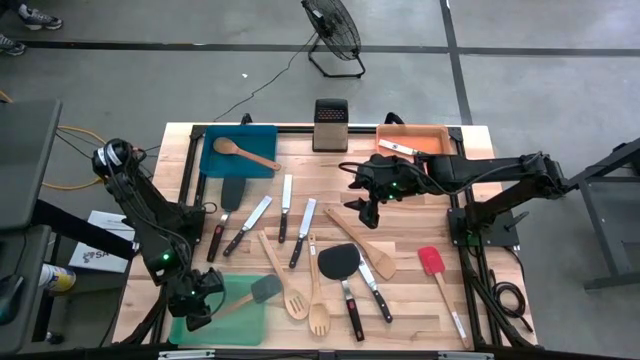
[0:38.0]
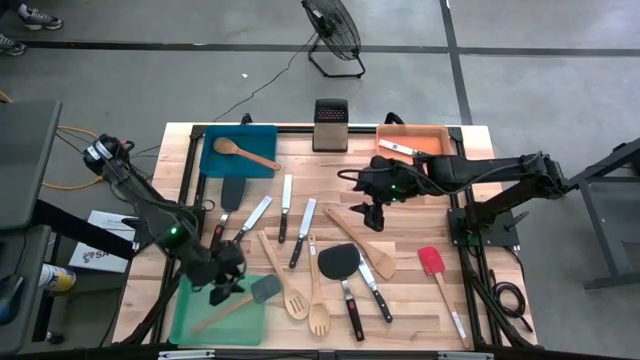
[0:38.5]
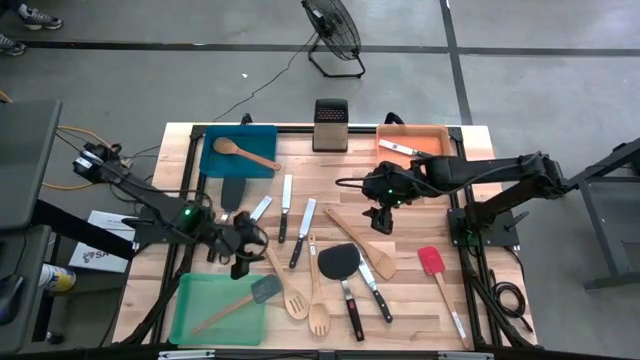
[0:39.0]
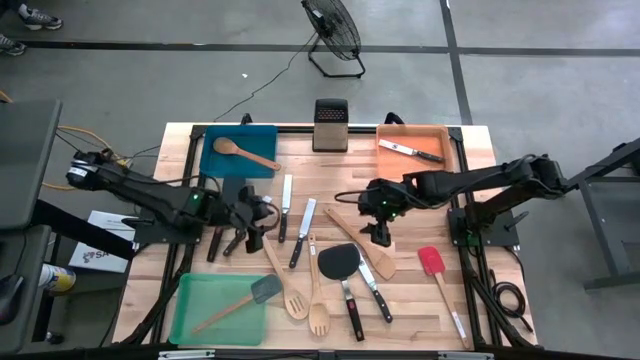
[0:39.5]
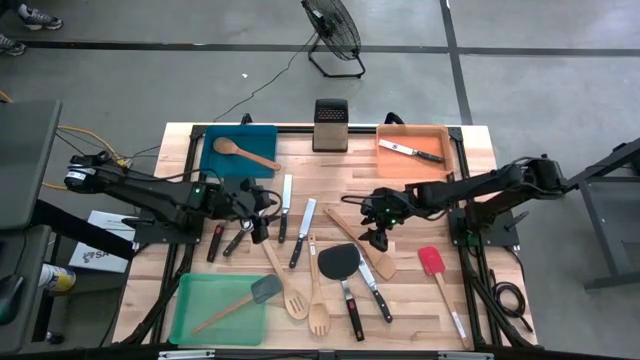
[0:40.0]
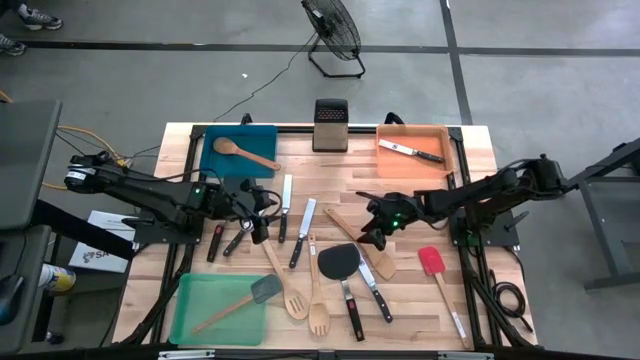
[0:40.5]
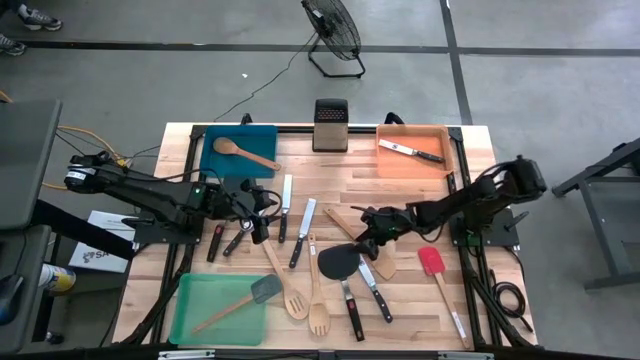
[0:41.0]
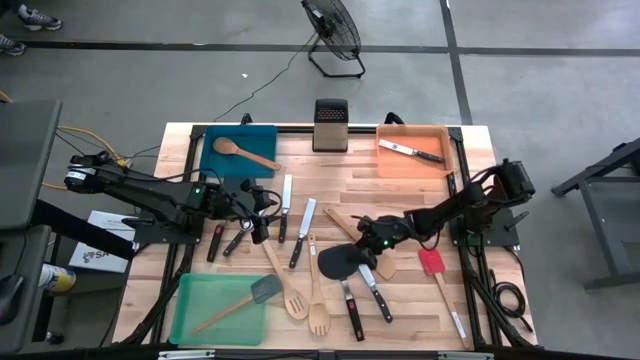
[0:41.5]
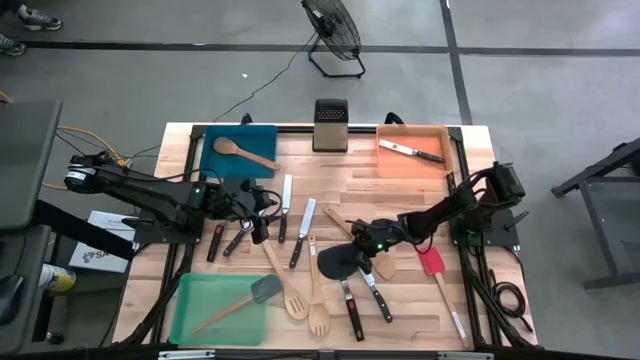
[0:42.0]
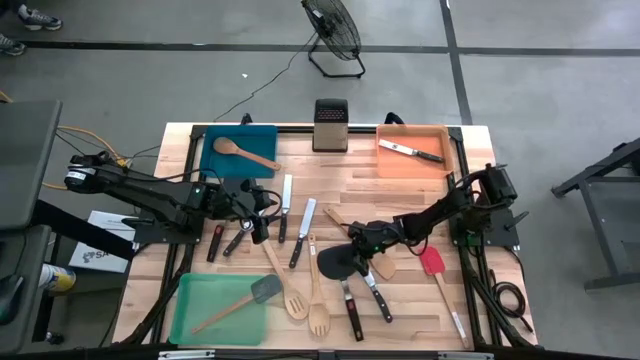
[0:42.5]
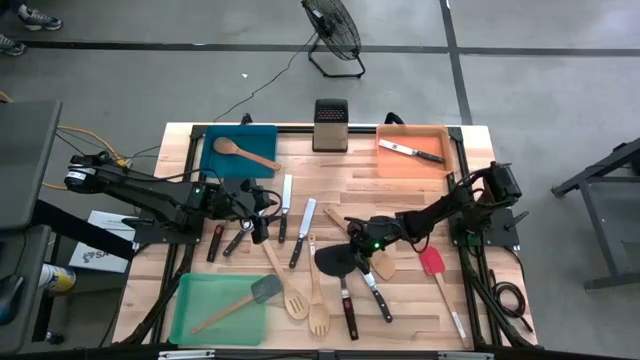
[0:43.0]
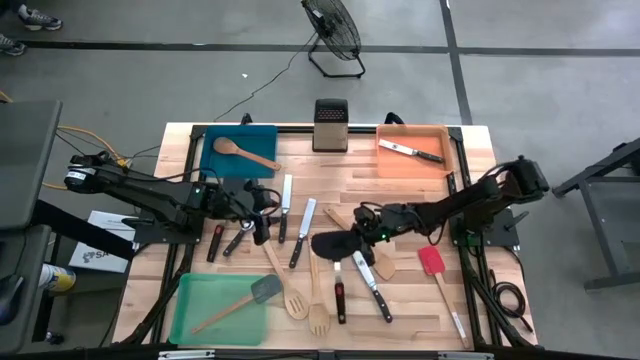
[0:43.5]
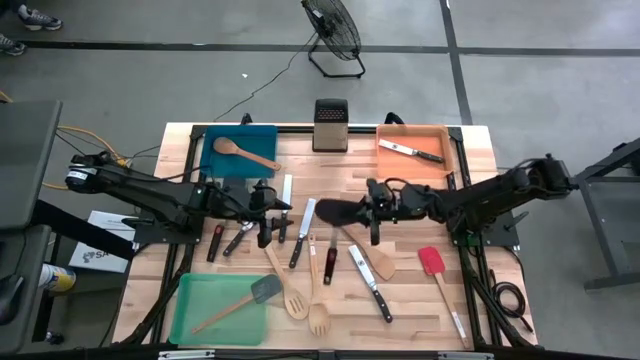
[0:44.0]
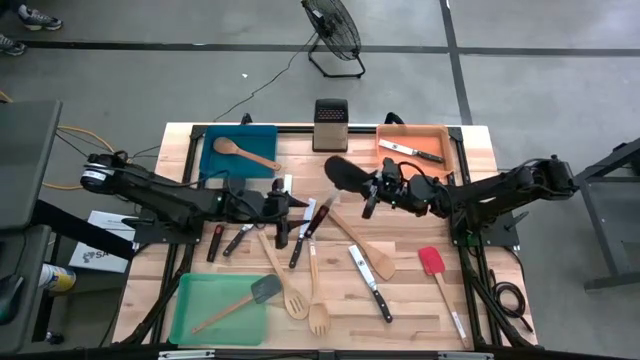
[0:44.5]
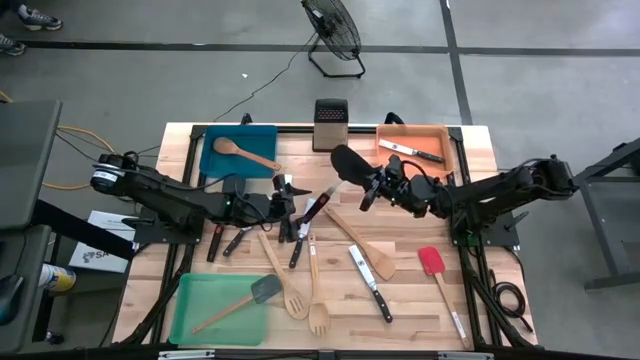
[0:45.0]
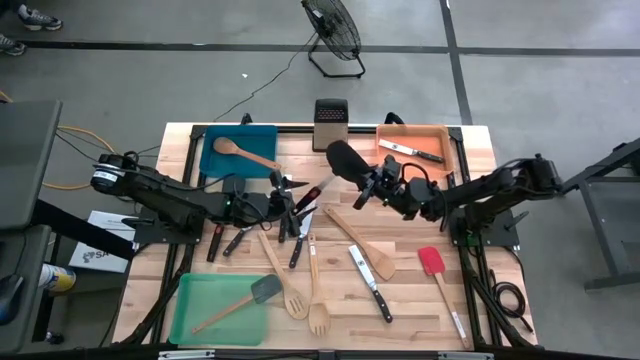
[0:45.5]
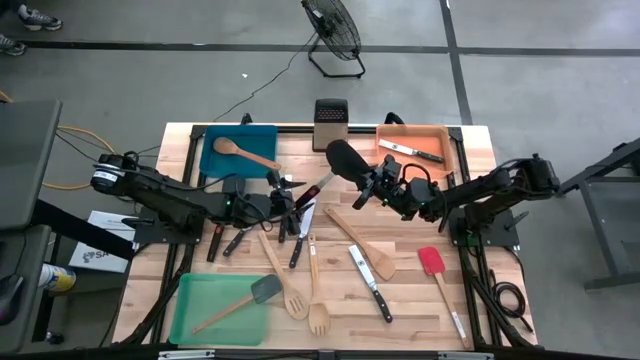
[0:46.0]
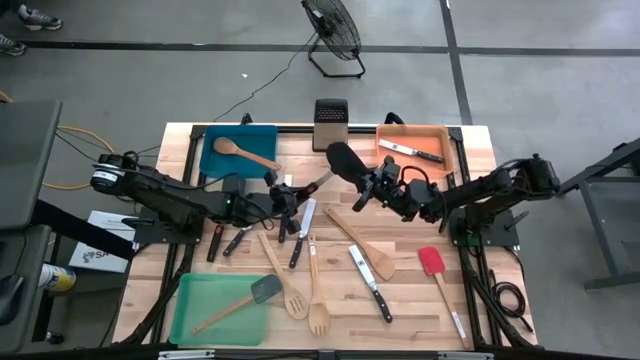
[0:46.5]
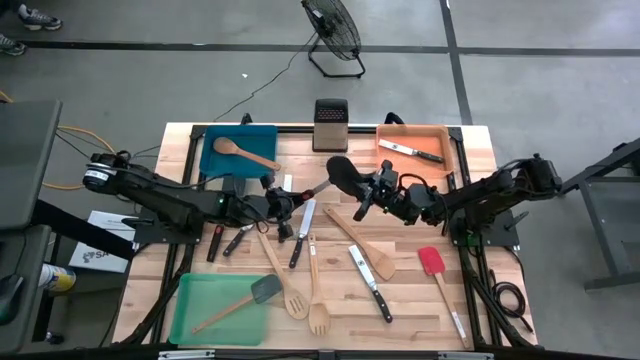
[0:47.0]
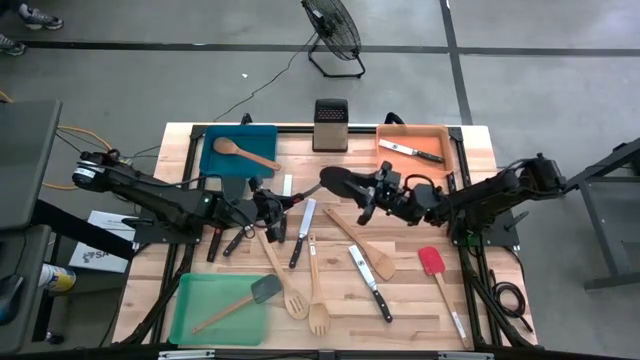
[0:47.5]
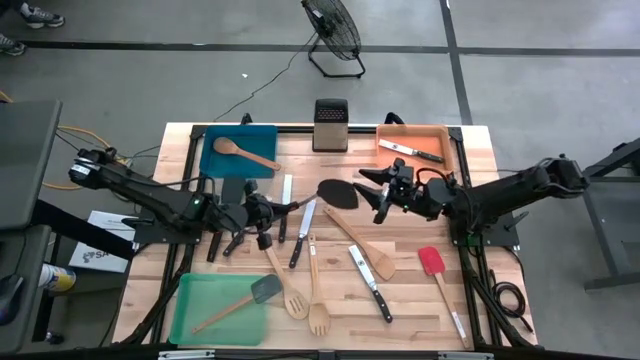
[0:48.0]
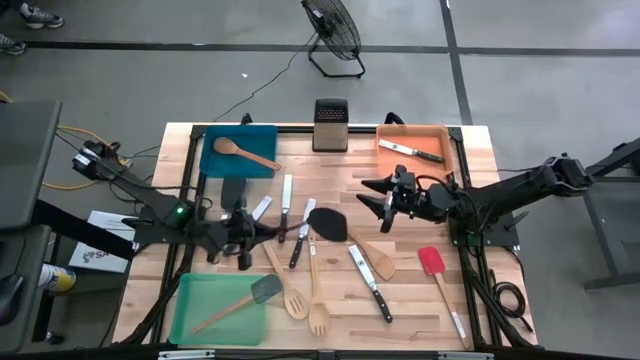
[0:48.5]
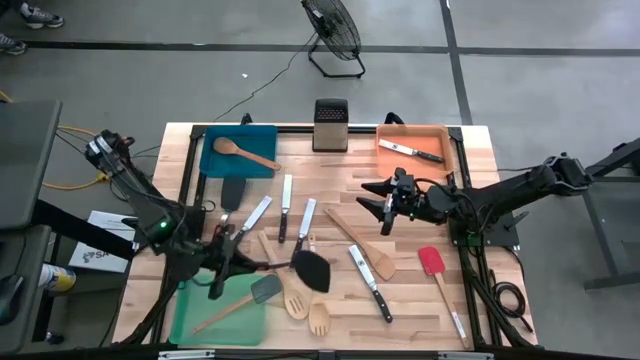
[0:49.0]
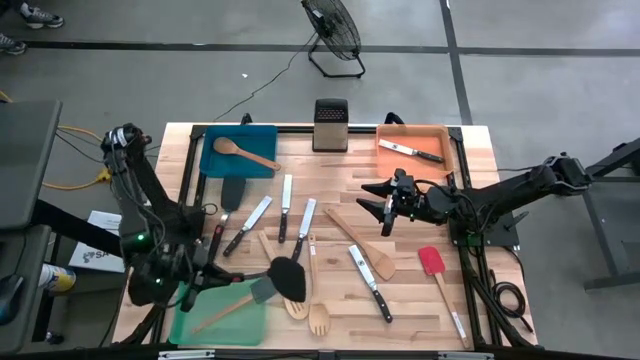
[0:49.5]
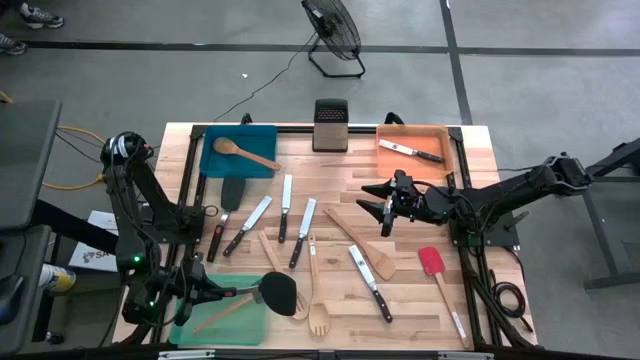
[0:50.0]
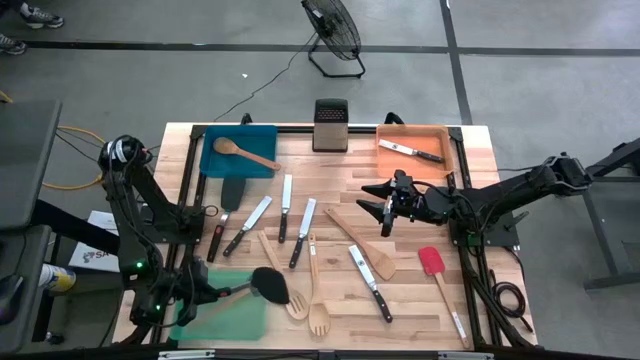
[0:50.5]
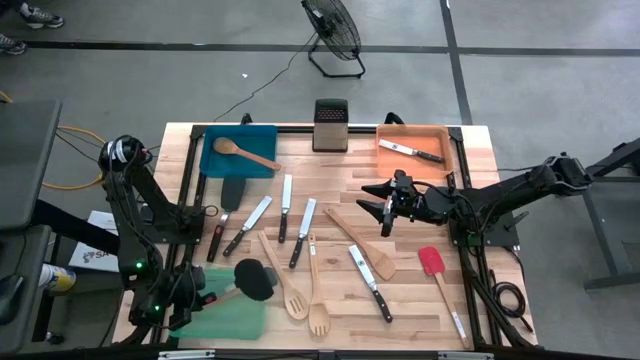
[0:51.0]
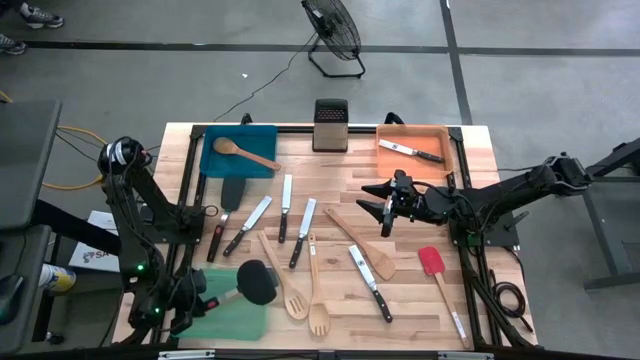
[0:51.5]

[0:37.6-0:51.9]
Task: Pick & Place Kitchen Items
Put the black flipper into the green bin

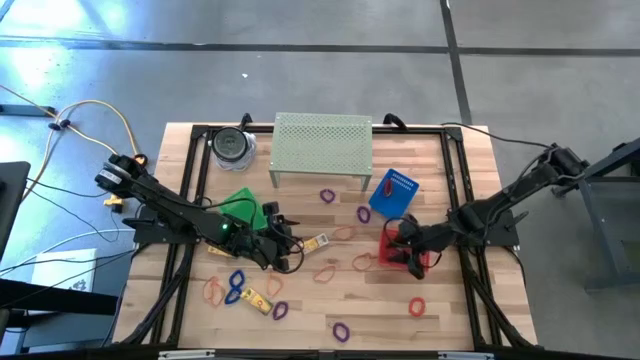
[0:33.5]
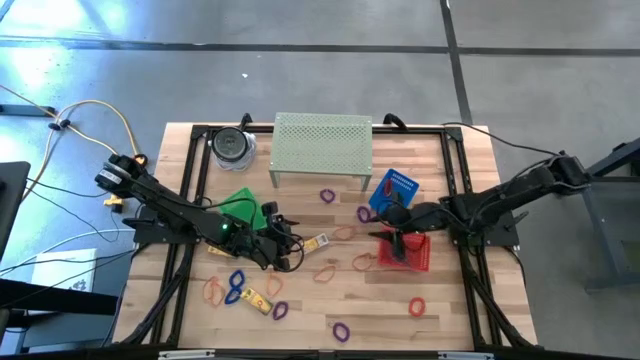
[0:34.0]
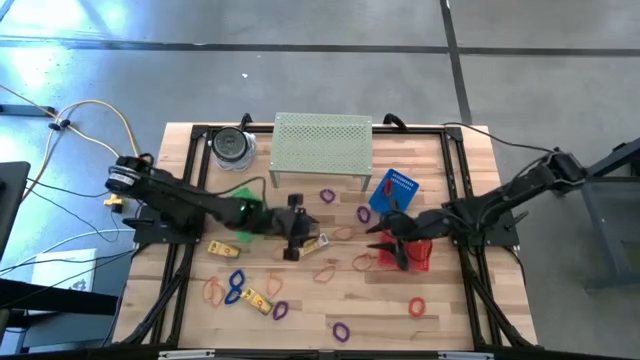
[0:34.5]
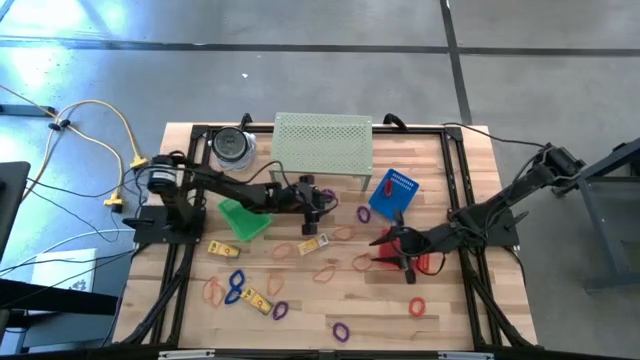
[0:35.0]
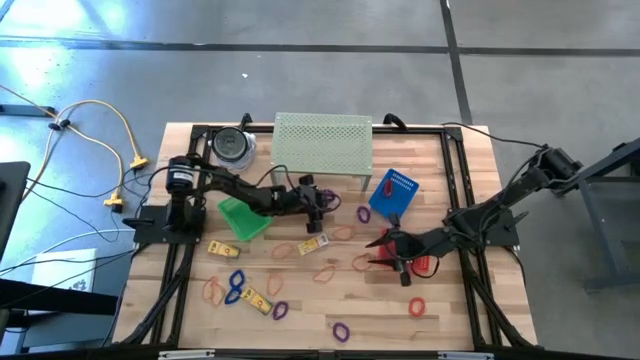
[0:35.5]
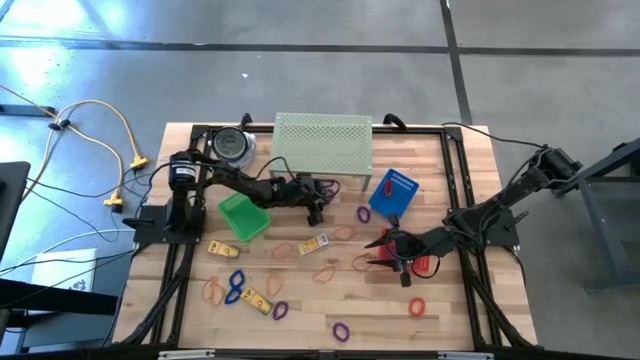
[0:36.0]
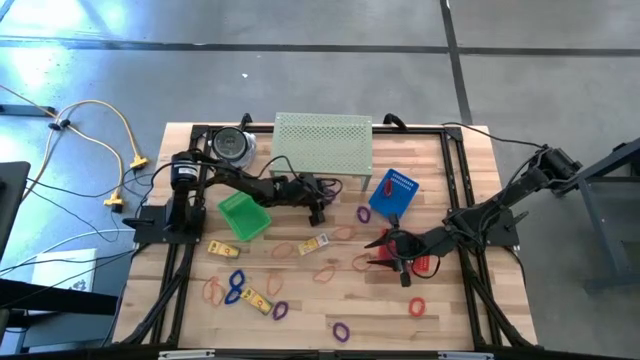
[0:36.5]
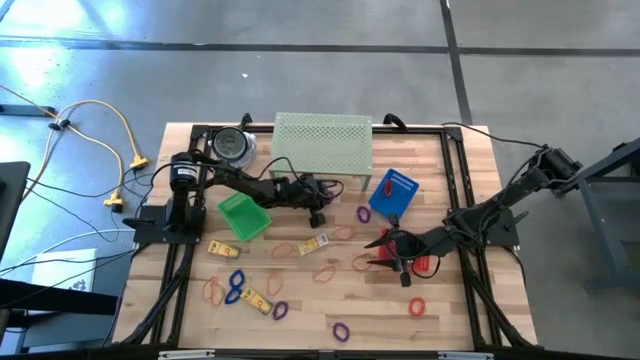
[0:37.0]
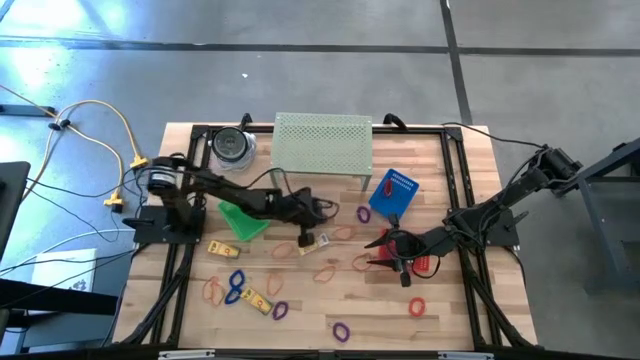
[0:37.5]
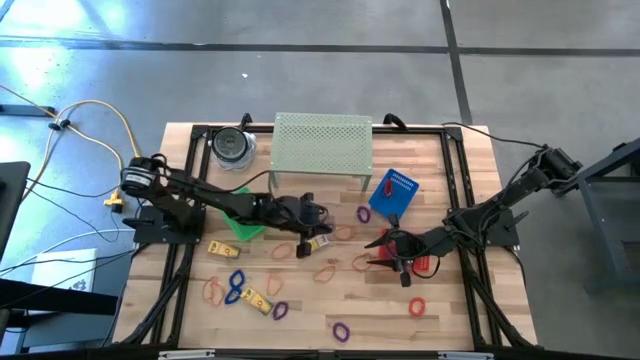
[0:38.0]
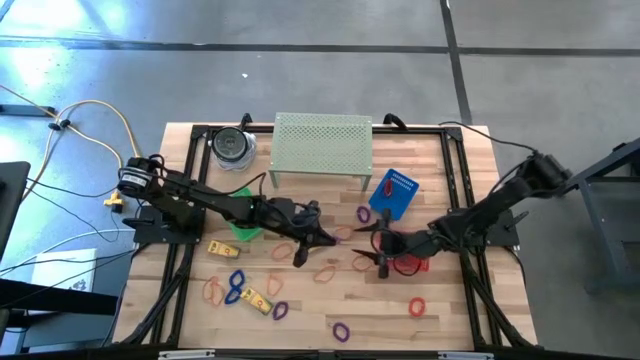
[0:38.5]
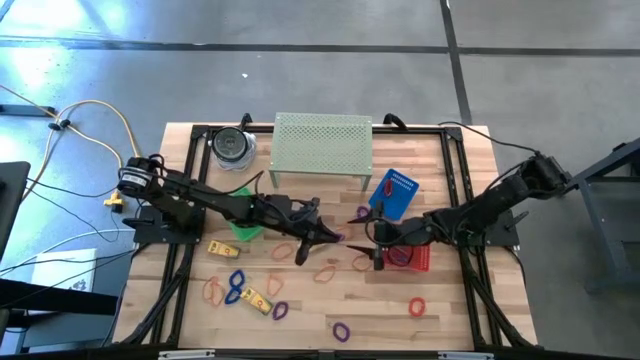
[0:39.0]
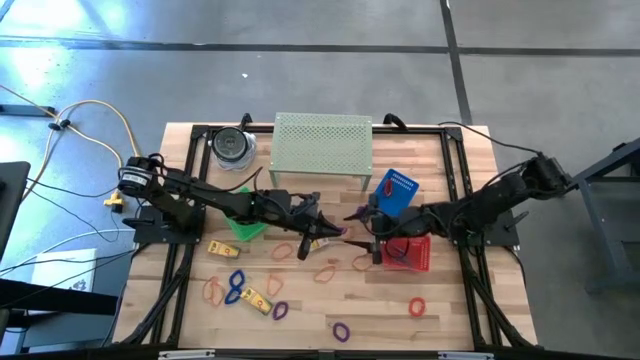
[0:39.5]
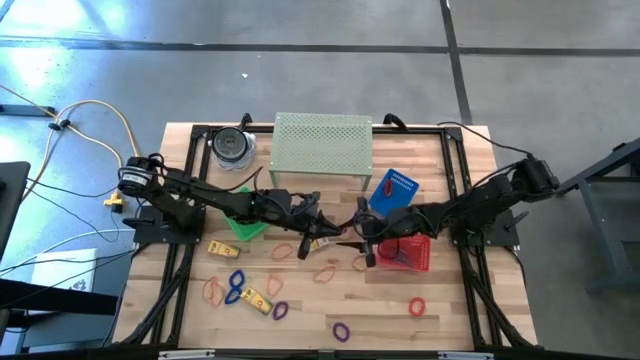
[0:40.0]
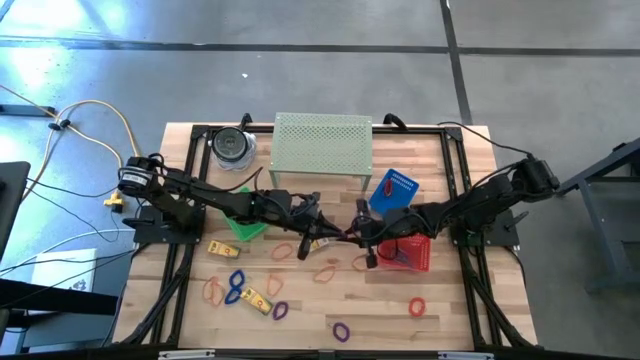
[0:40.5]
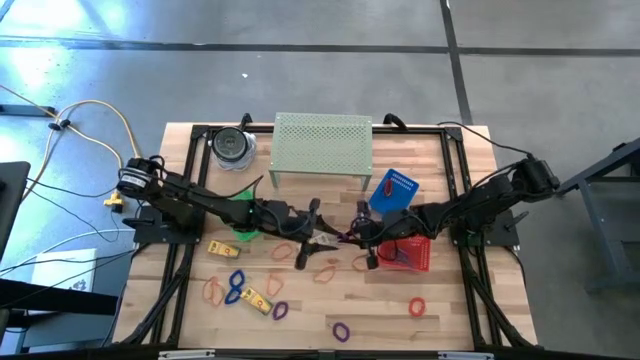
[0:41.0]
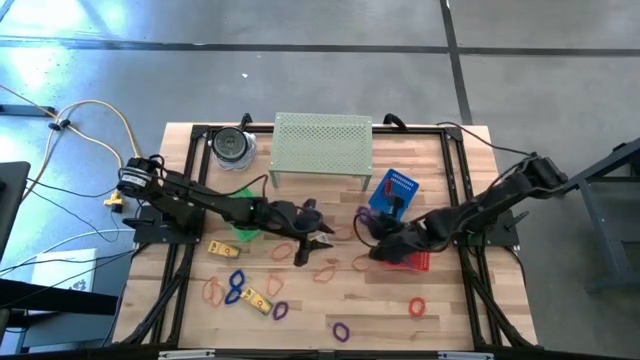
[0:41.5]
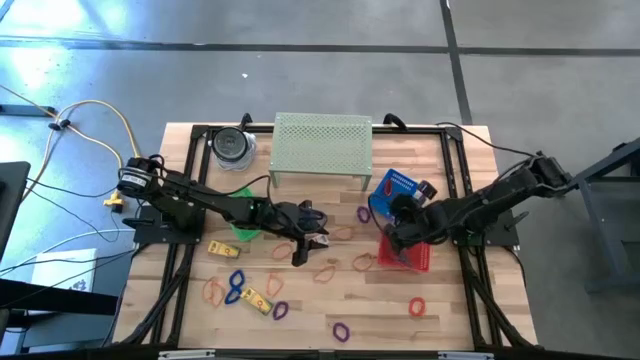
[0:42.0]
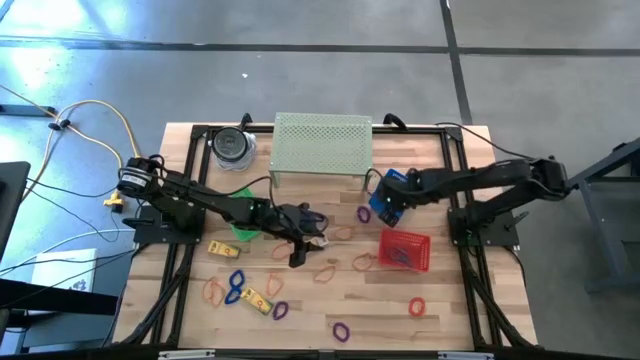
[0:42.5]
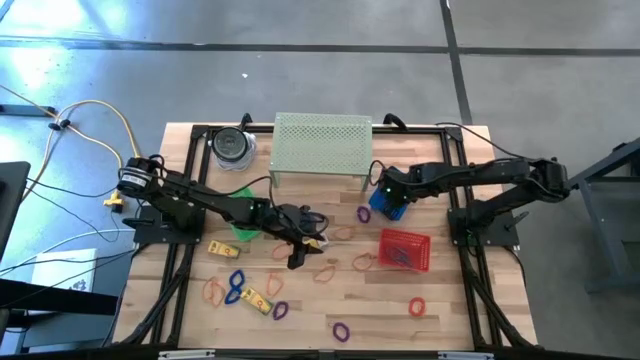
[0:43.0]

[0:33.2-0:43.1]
Task: Pick & Place Office Desk Supplies
Put the violet spring keychain into the blue basket
